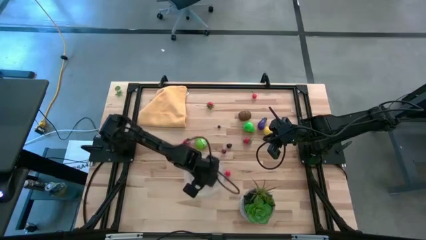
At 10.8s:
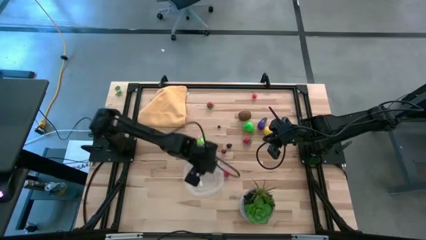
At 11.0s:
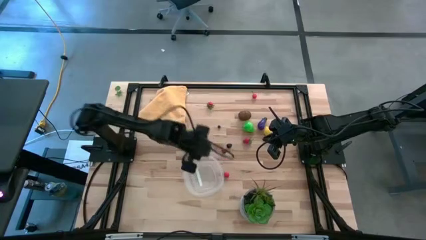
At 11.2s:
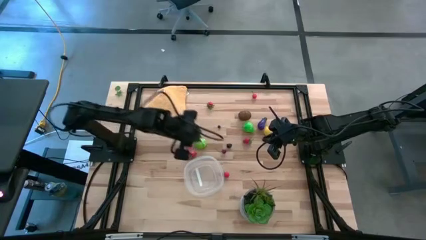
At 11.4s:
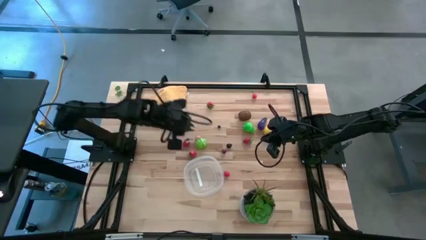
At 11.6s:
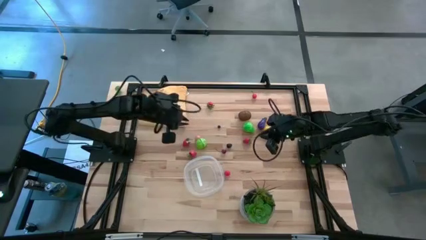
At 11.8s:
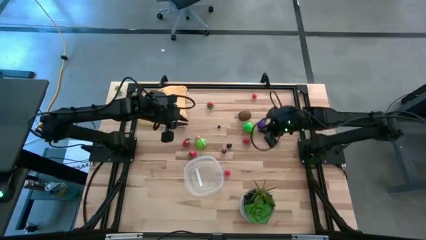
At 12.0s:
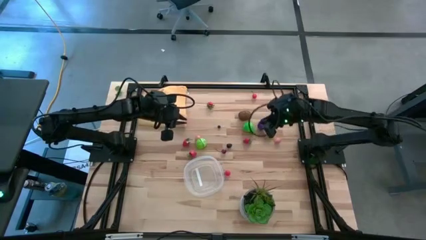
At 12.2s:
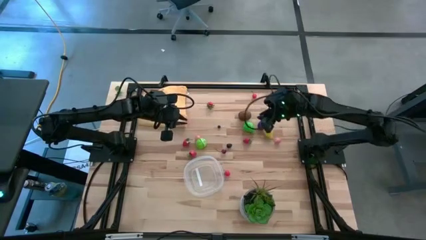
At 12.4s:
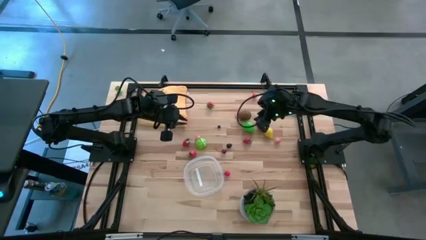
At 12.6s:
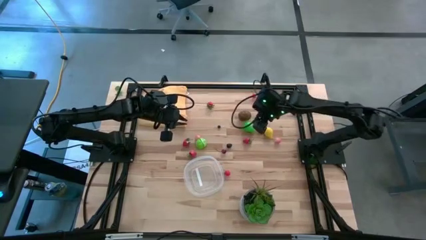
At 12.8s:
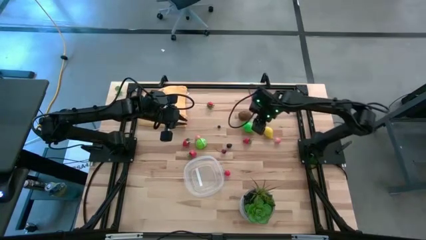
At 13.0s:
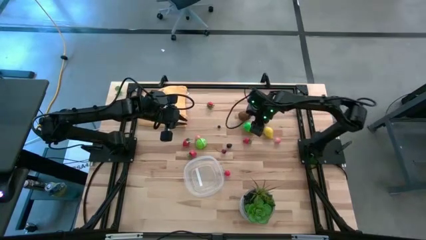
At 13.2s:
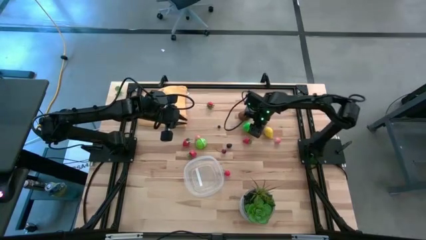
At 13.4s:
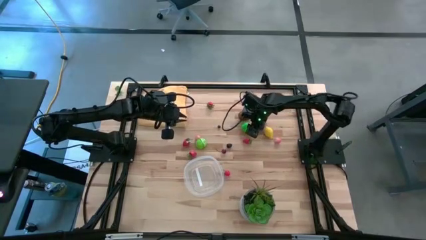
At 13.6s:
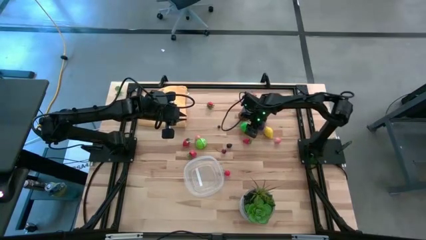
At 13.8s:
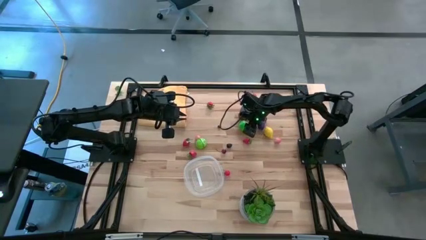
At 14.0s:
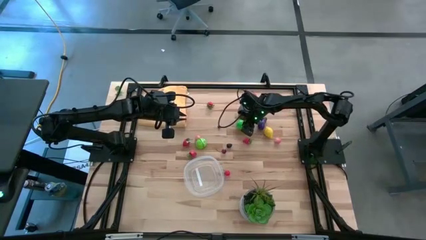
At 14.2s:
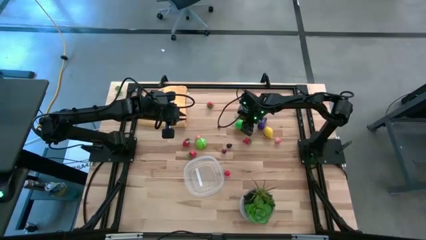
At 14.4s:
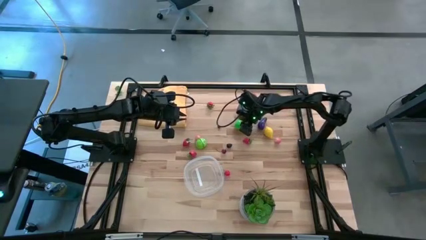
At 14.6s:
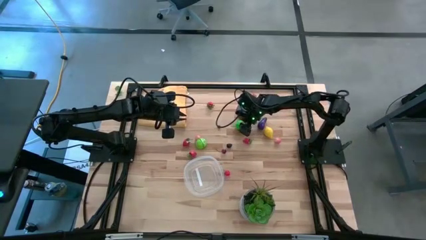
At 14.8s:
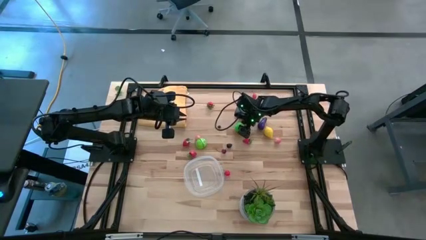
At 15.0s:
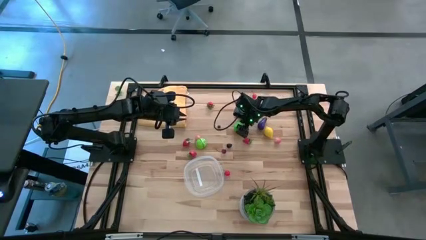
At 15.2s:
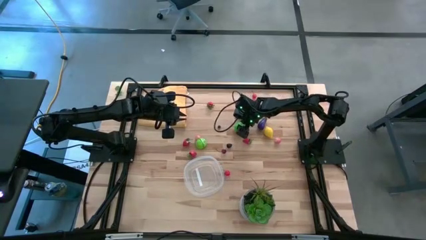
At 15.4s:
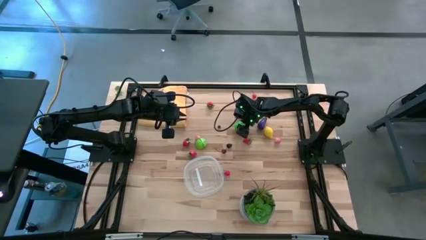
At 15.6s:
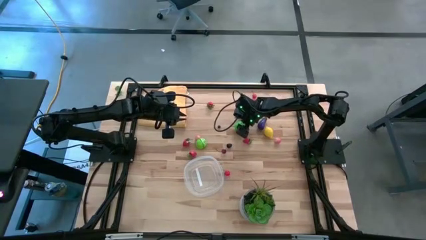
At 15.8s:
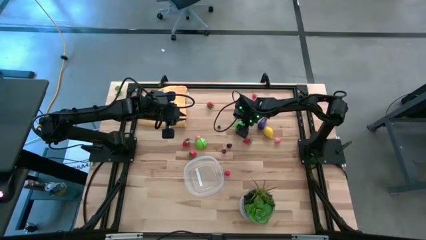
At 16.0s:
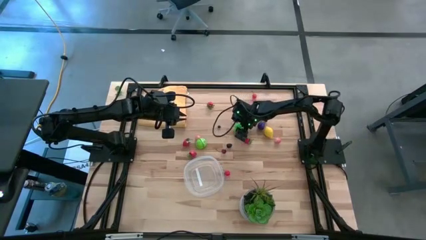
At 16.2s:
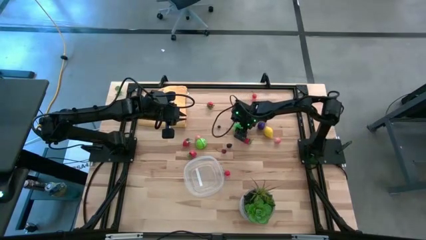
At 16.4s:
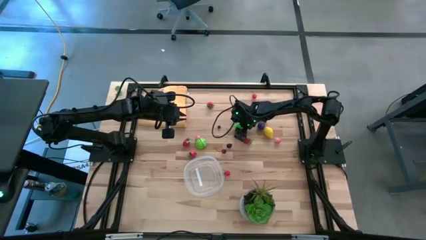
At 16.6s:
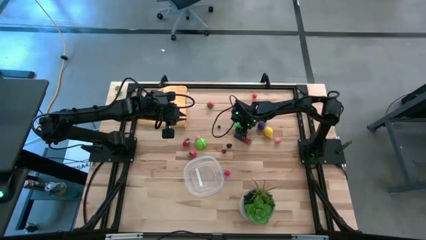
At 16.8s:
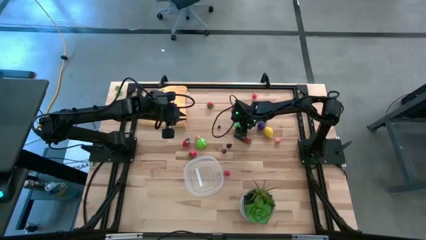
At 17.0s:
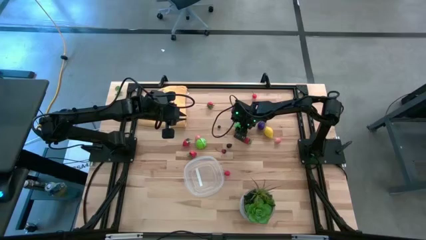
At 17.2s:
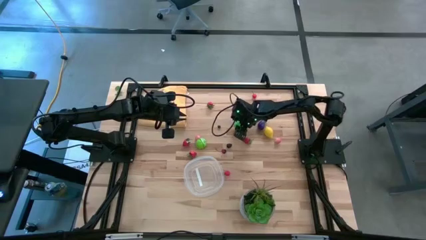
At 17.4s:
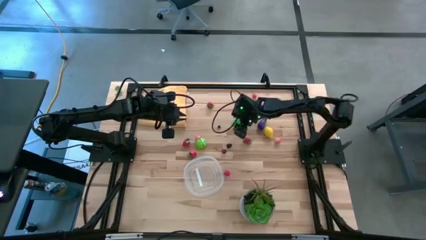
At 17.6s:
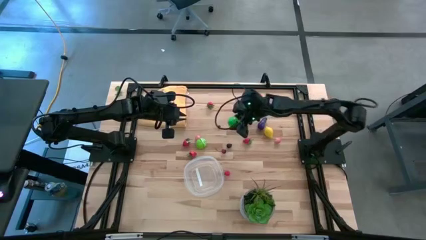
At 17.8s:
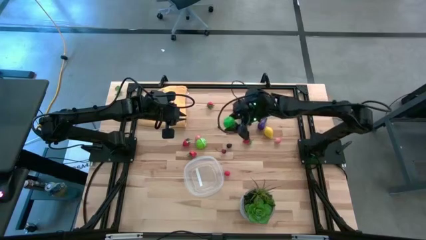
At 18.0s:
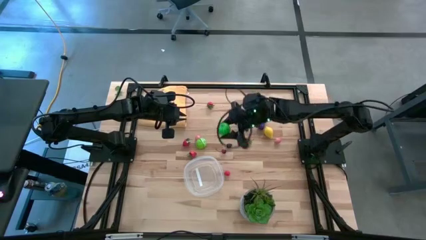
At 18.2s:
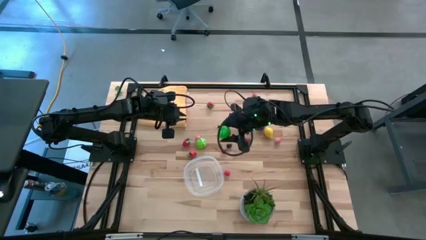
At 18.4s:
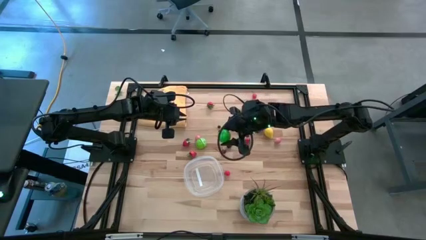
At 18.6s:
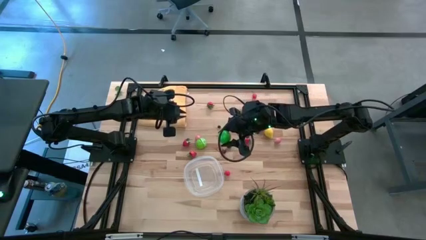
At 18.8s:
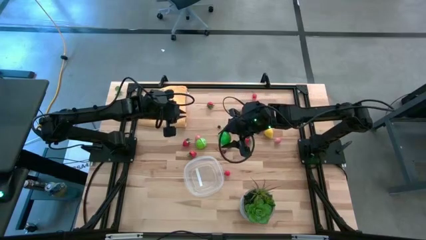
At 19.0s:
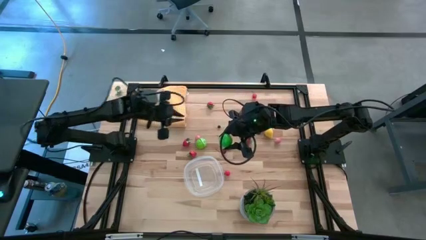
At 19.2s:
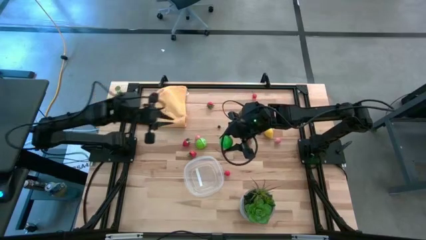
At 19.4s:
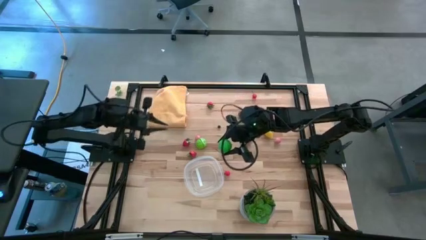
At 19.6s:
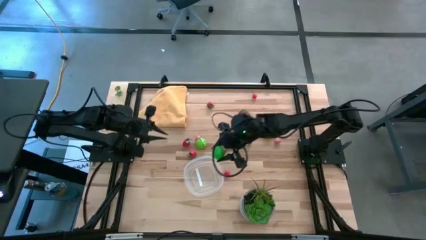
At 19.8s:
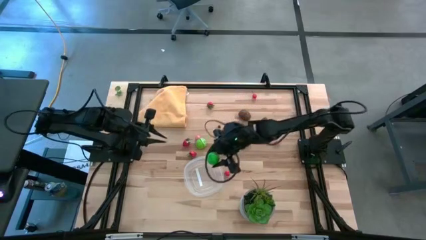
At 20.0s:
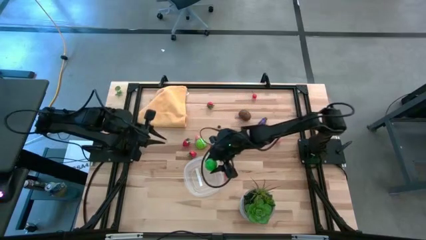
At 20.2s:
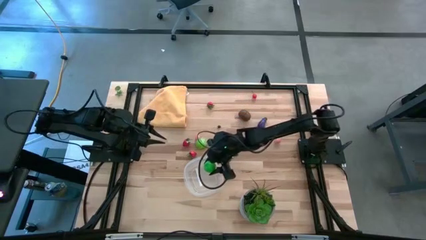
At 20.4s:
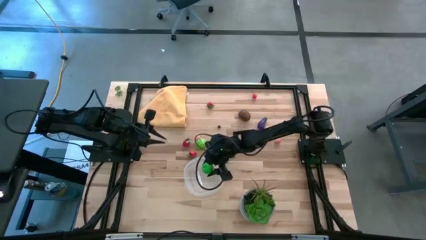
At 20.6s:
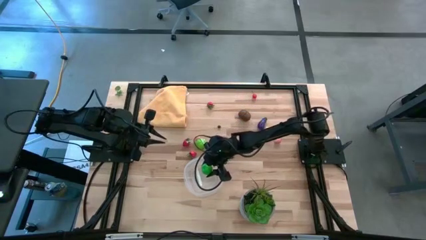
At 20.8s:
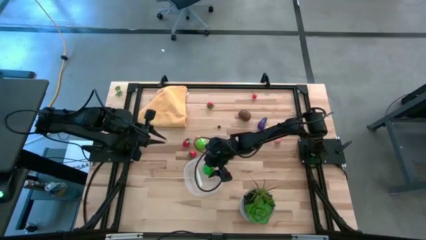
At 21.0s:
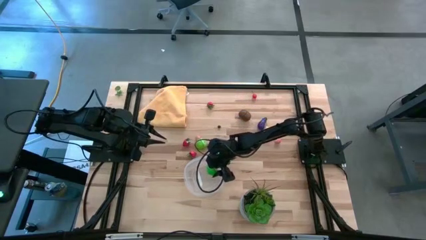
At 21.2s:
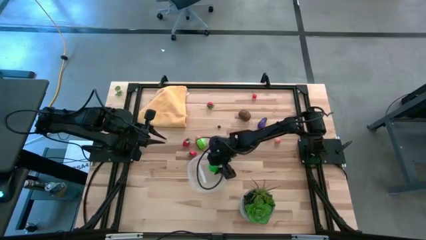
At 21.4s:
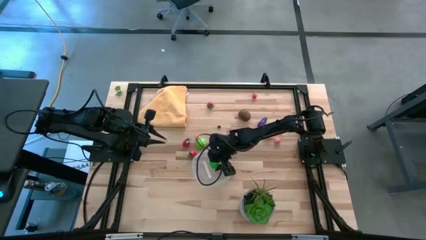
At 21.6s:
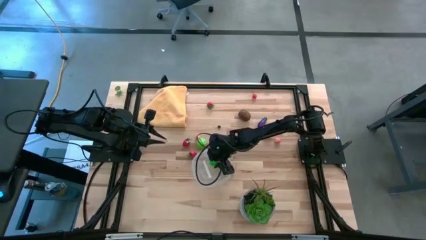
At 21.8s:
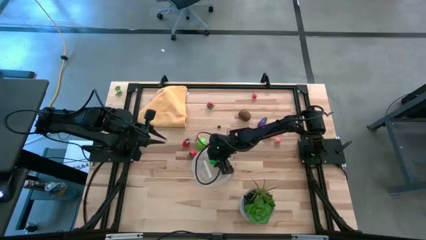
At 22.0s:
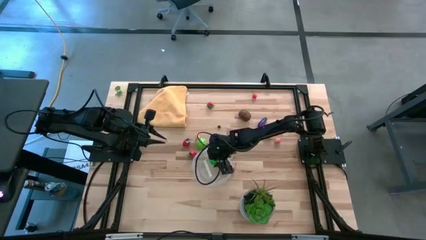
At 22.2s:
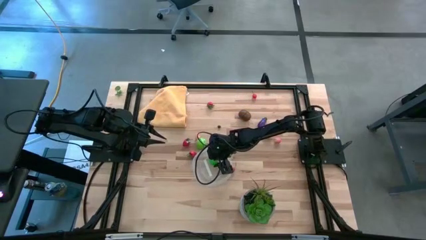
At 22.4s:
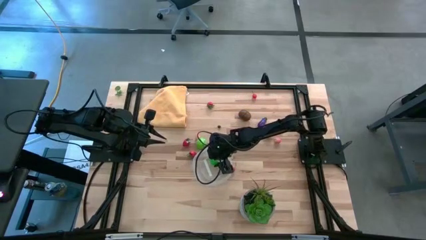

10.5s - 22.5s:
Task: Pick and placing Produce into tupperware
Put the green pear into the transparent bin

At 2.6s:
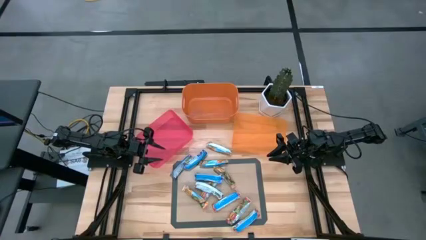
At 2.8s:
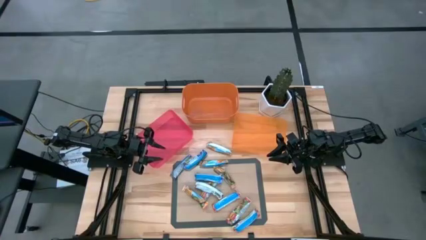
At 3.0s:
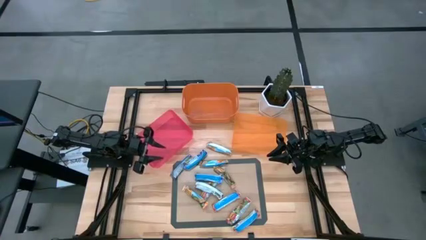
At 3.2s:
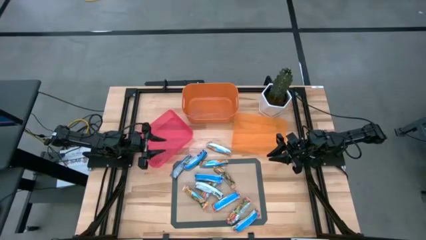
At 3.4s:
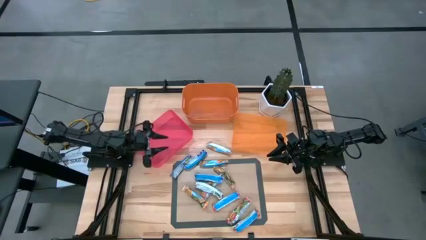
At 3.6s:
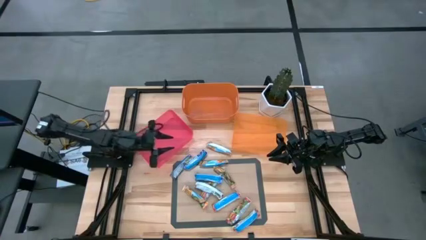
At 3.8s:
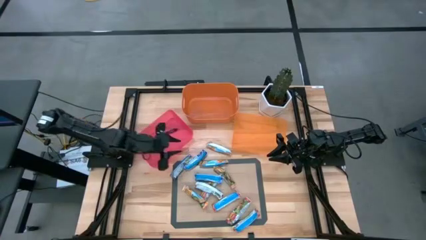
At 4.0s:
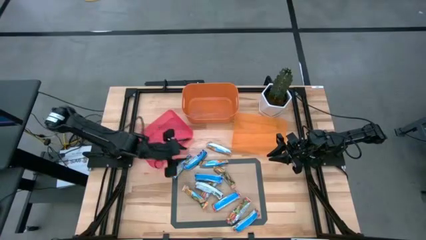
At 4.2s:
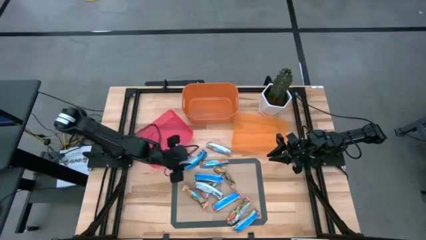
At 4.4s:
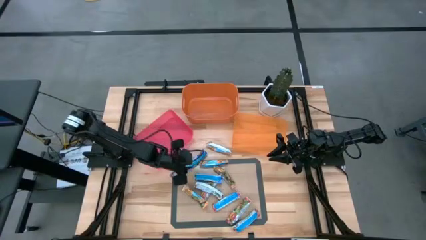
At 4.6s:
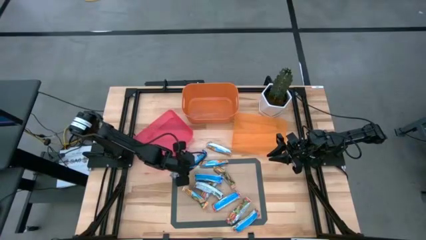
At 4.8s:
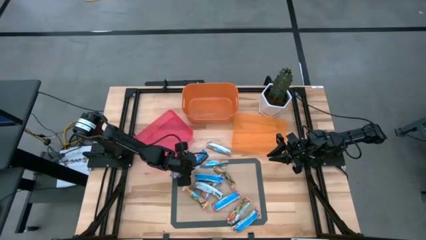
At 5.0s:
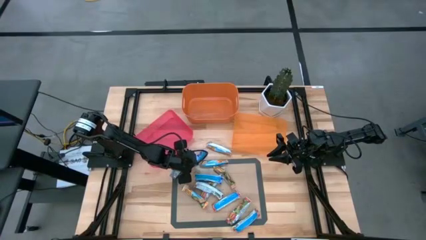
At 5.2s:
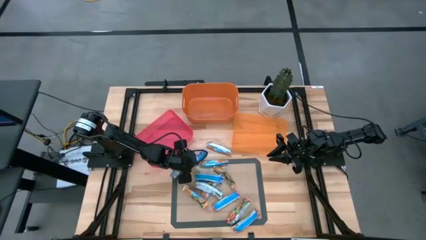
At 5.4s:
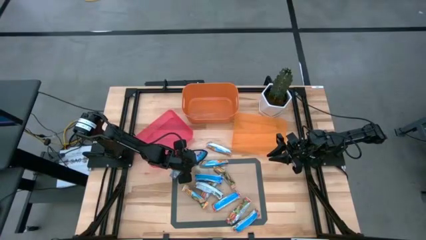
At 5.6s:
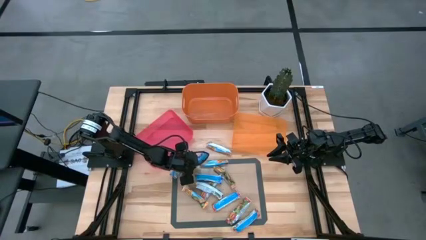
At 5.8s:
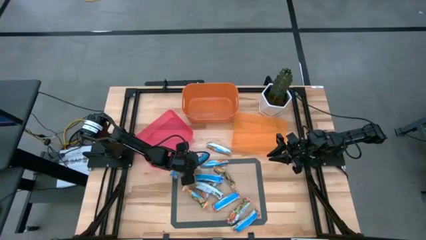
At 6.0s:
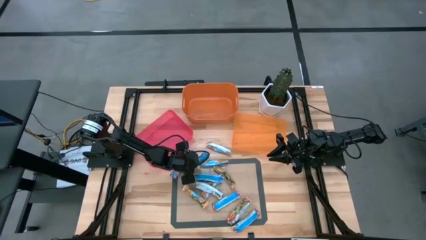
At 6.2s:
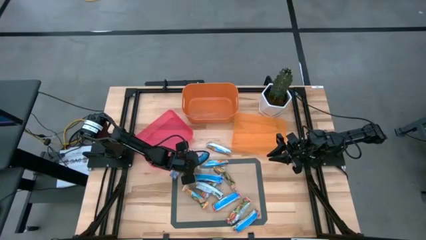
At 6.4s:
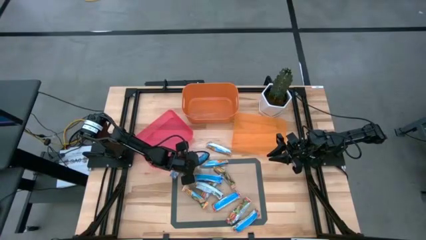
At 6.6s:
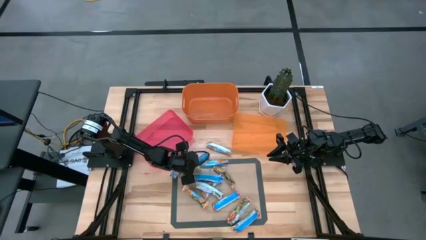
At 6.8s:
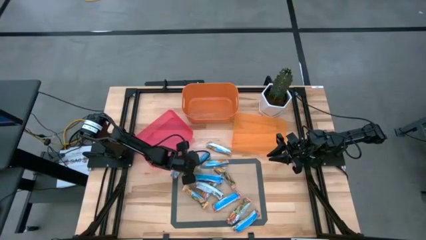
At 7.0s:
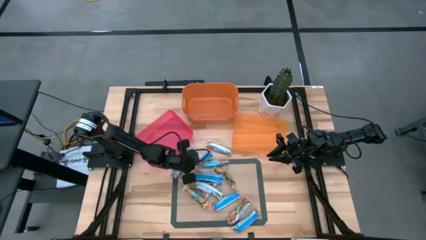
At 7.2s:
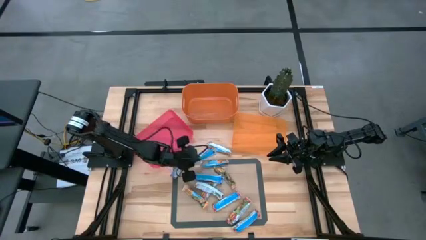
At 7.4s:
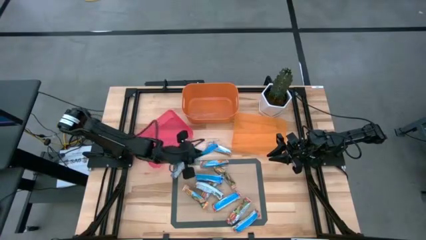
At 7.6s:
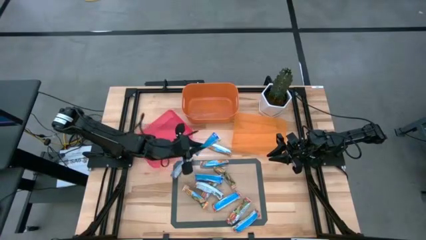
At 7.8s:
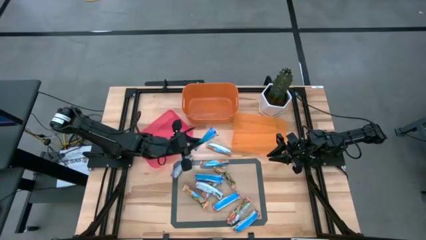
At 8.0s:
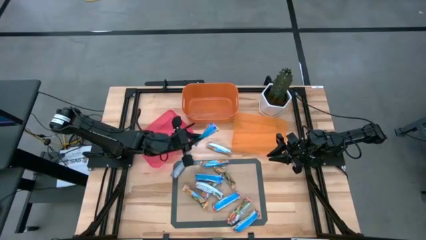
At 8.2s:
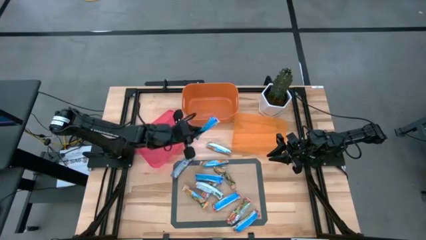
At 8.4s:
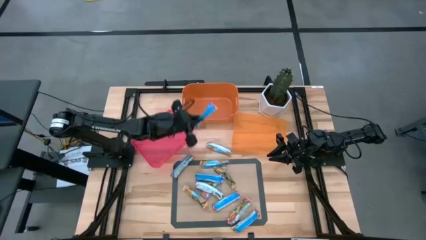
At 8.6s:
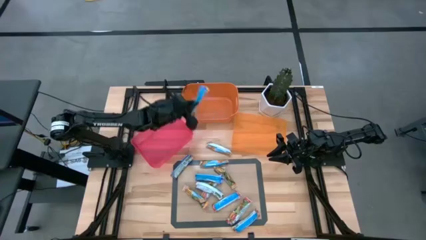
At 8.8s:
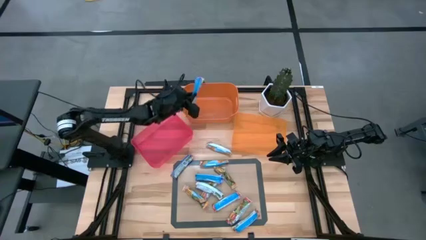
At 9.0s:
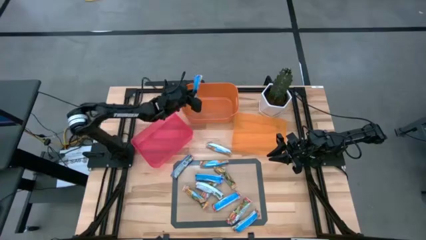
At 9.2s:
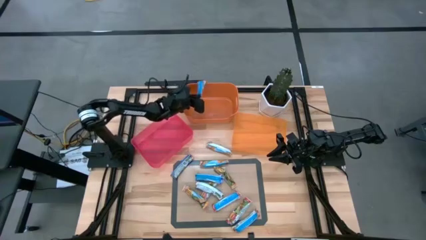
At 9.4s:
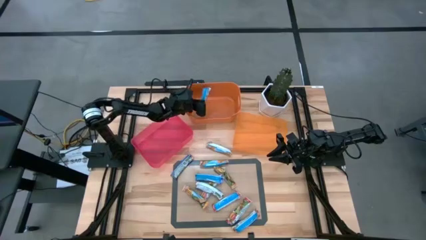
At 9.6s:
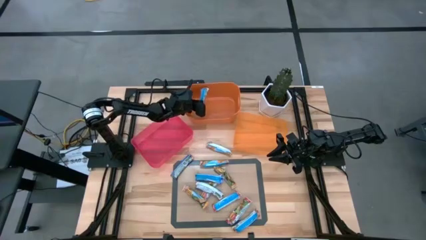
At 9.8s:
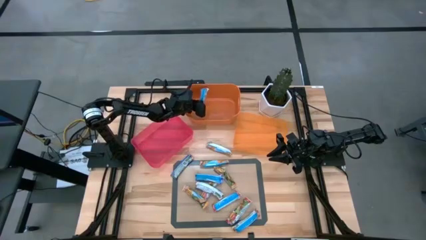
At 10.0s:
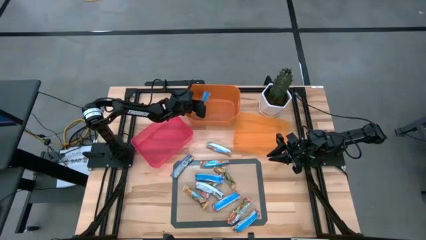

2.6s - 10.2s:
Task: Pick and place Granola Bars by type
Put the top right blue granola bar into the orange bin
